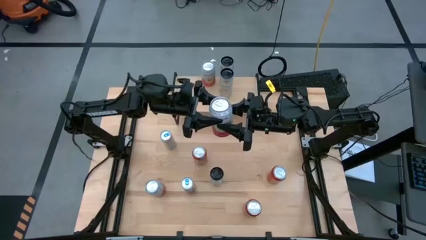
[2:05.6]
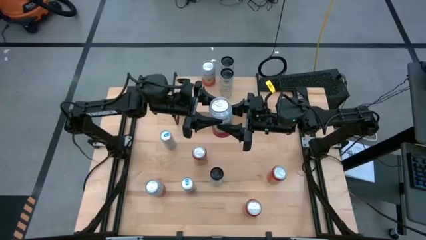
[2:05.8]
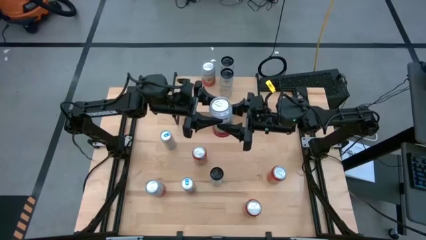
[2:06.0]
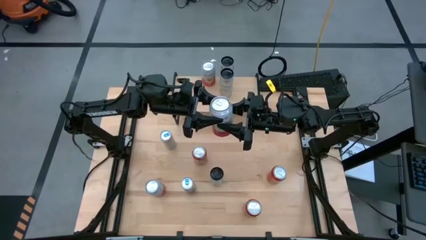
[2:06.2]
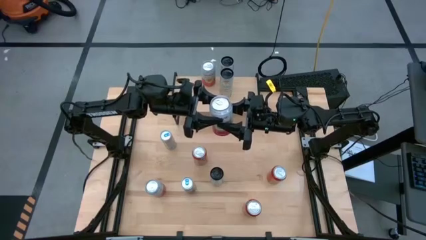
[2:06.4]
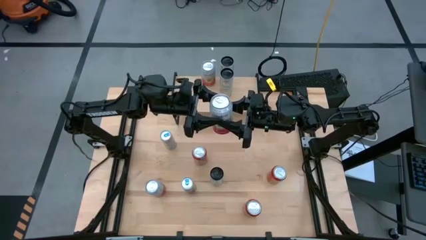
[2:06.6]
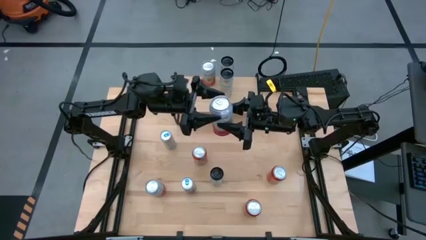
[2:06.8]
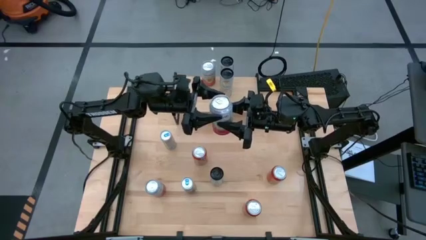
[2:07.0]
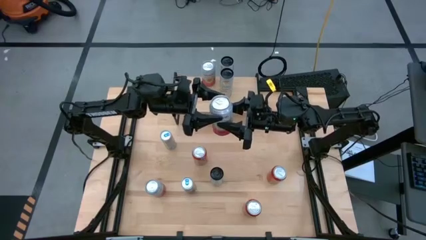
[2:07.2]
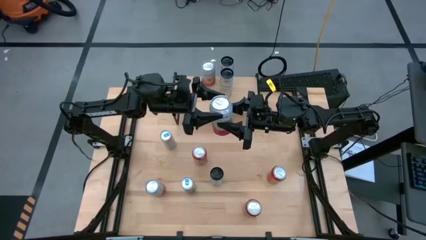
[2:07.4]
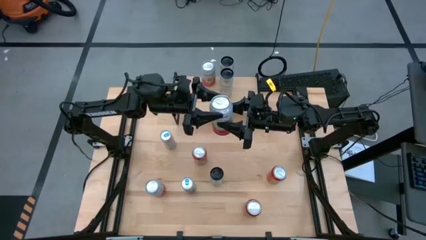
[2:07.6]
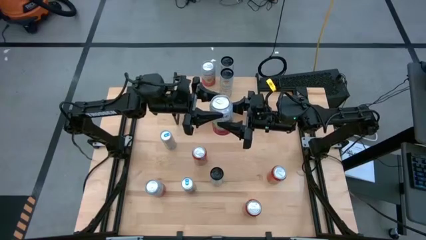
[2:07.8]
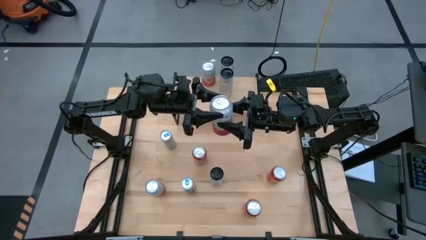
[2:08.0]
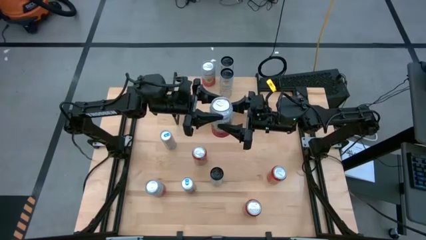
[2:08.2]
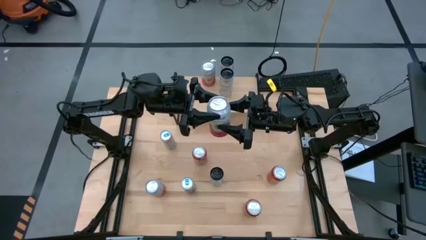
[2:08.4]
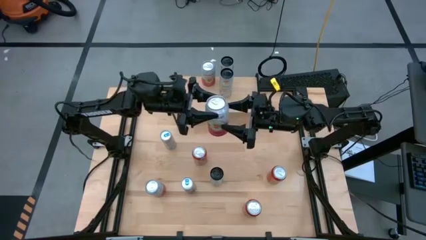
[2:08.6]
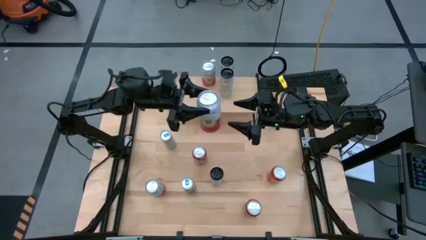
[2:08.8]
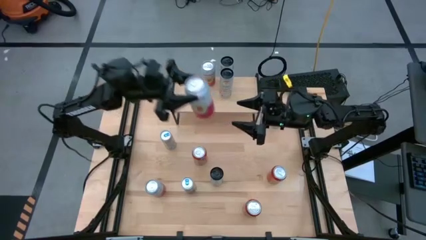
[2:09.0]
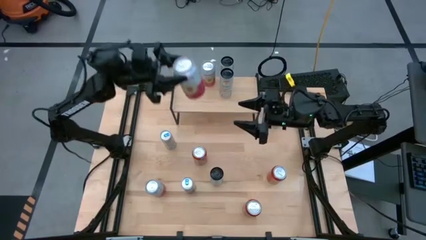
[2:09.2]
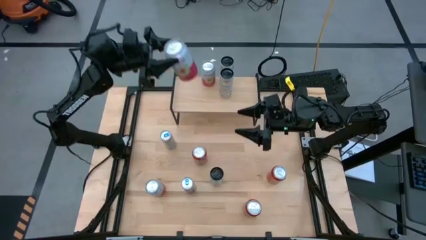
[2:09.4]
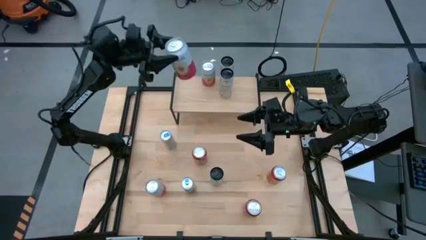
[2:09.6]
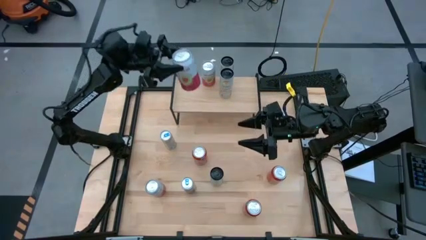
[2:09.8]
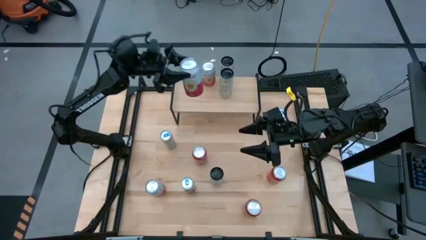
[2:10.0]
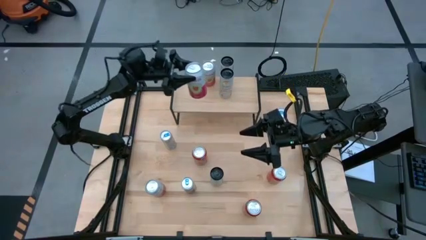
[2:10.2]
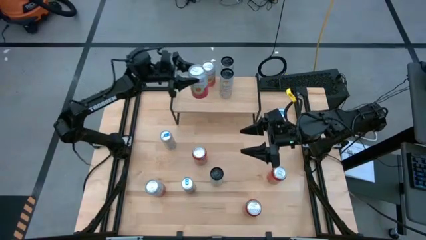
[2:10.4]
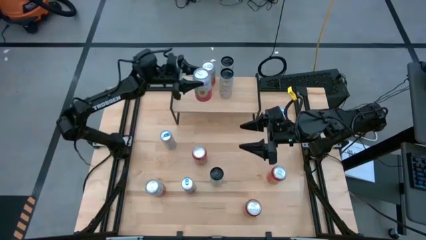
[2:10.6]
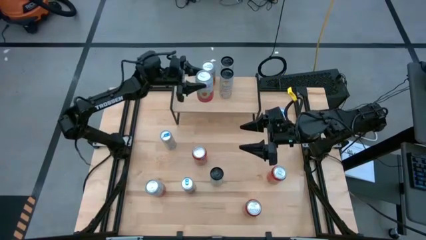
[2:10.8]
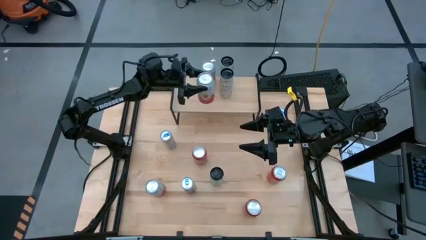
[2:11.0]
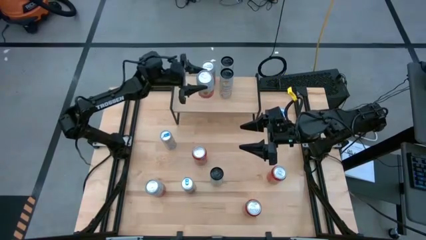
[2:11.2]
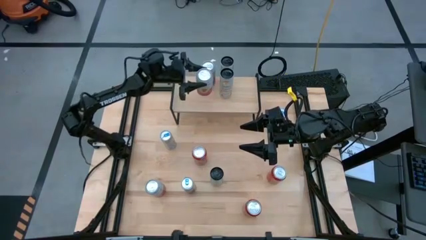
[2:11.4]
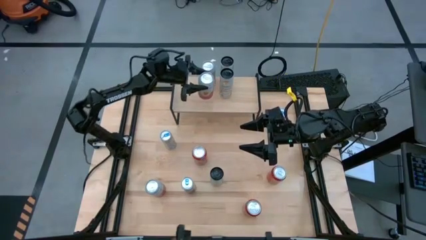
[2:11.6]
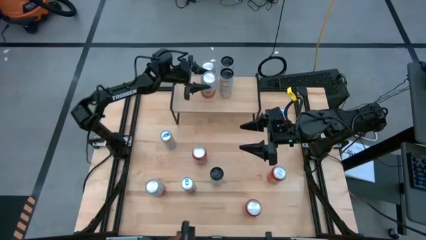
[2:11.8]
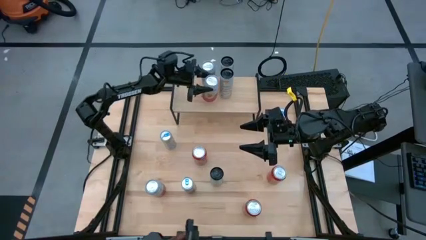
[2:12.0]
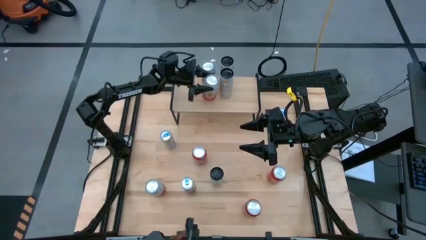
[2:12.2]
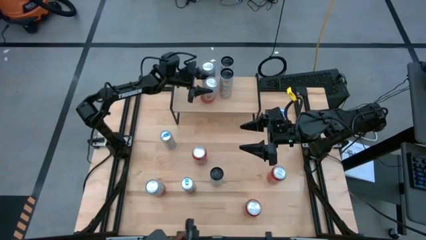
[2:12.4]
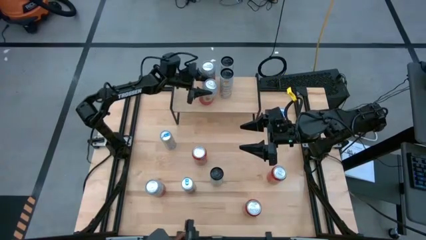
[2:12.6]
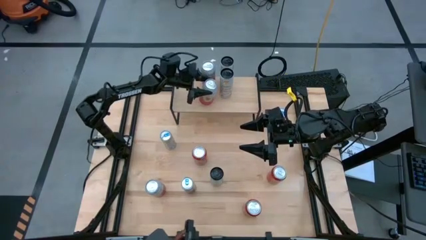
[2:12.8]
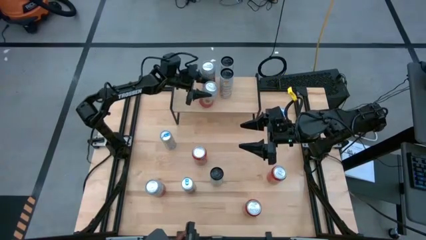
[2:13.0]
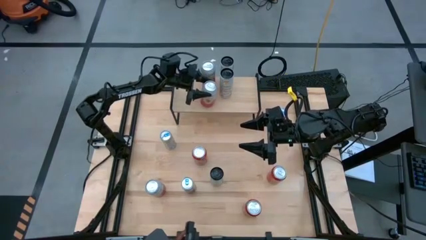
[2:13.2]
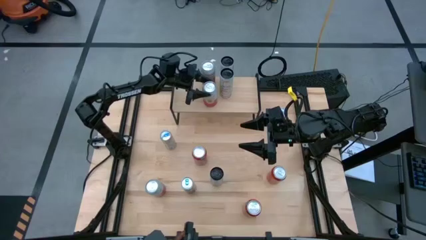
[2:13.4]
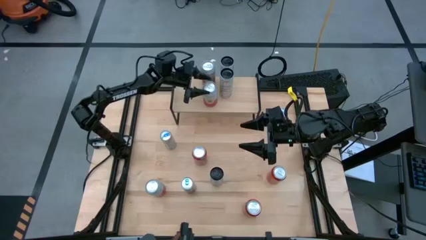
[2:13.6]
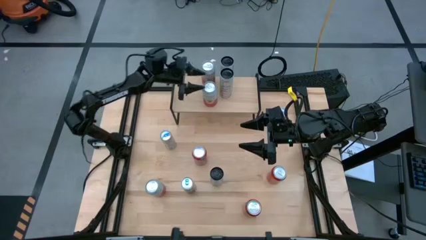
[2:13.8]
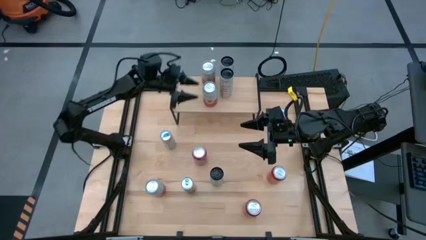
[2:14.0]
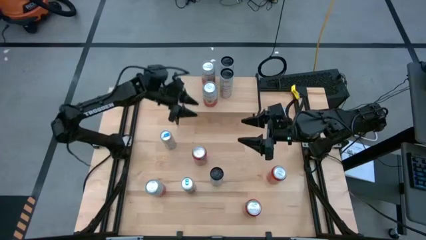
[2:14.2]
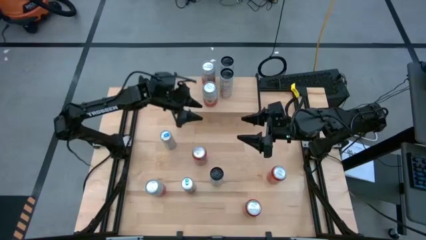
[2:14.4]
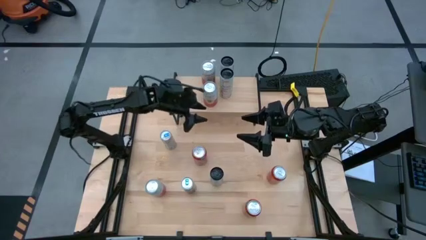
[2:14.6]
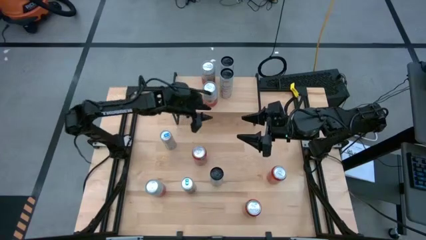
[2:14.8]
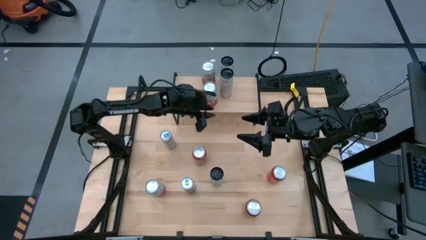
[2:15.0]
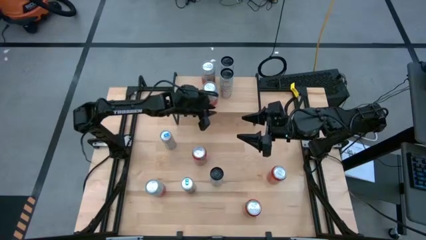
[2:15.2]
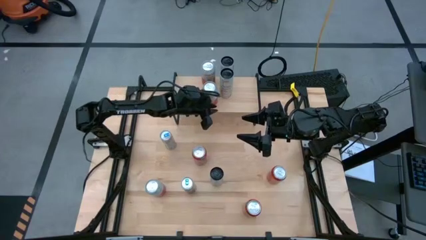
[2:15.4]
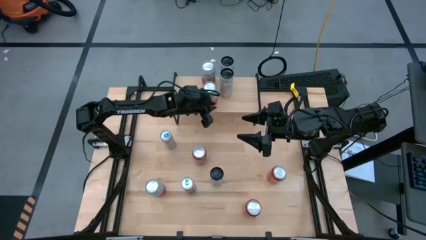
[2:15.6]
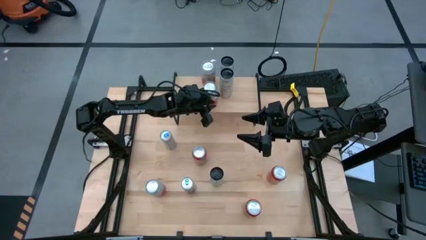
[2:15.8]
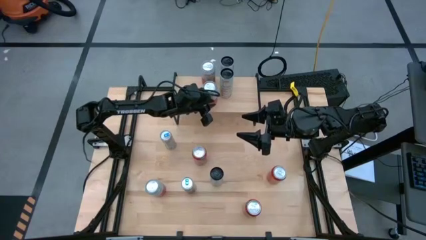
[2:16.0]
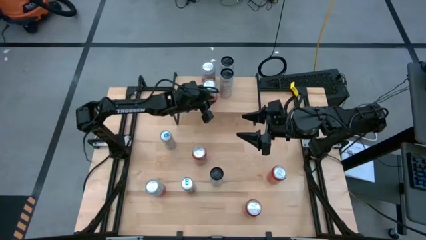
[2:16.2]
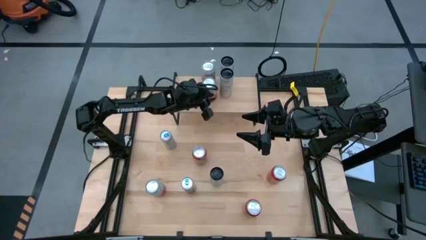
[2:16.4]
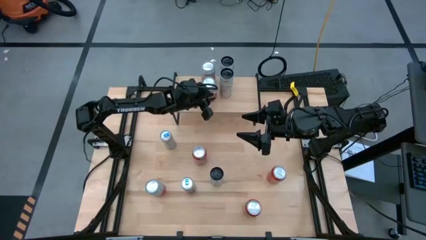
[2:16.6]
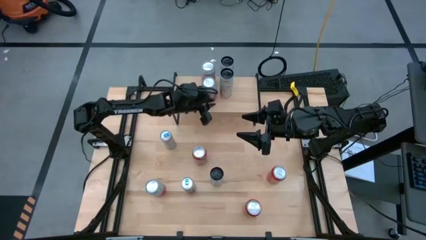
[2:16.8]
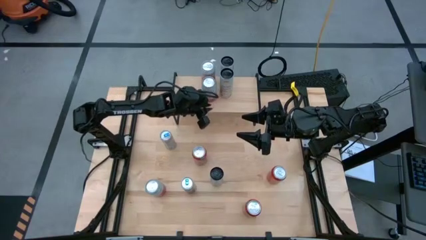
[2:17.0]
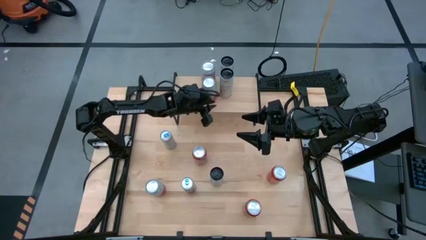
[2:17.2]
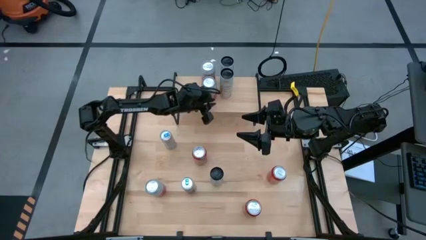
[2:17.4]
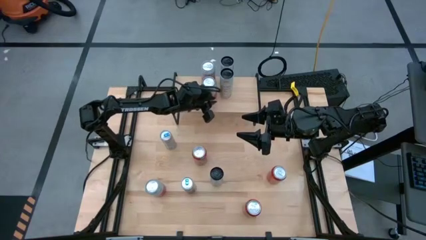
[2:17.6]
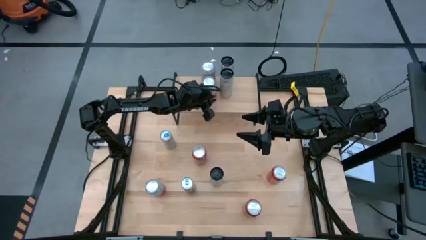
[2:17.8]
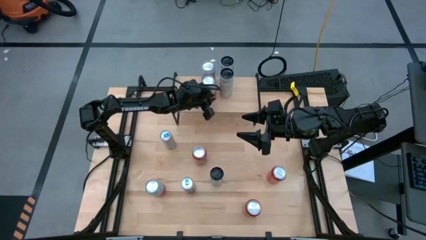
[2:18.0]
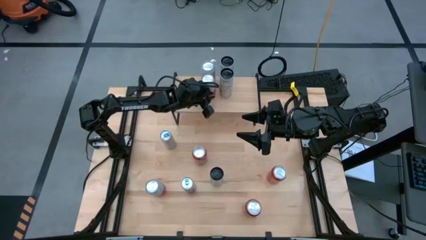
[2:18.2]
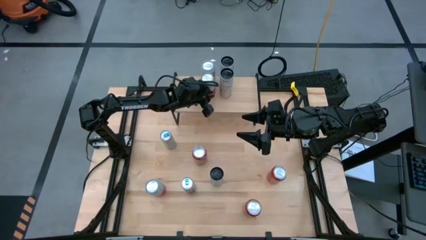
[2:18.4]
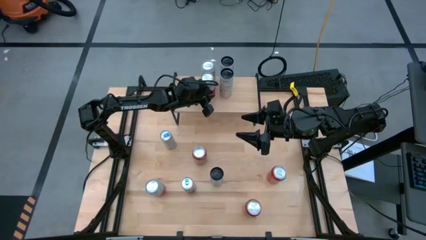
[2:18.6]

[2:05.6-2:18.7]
Task: Place canned beverage on shelf
Put the right pink-white soda can aligned with the other pink-white on the shelf
